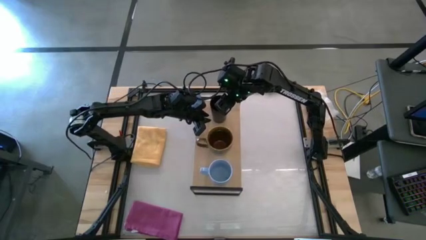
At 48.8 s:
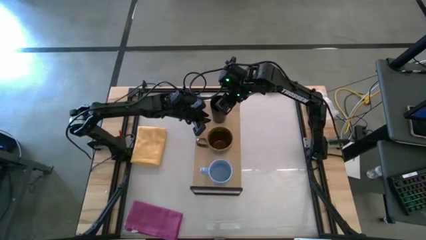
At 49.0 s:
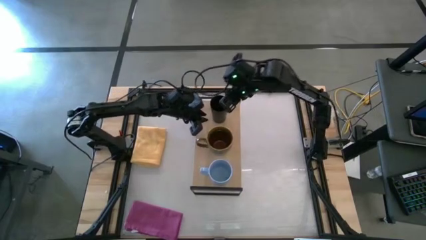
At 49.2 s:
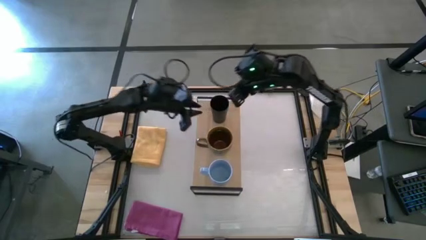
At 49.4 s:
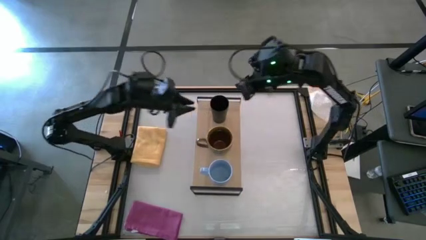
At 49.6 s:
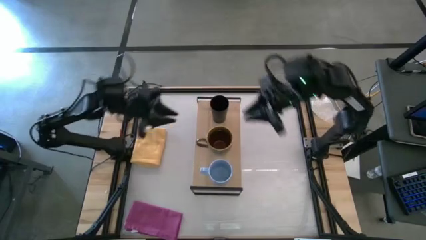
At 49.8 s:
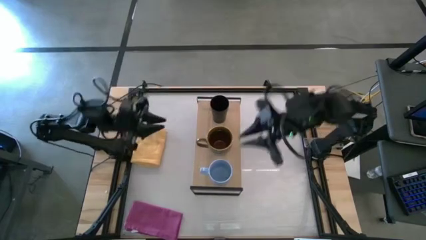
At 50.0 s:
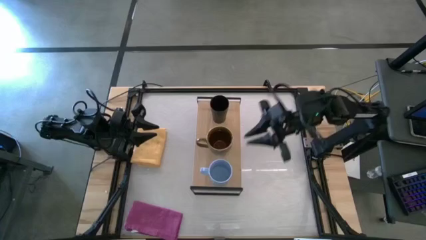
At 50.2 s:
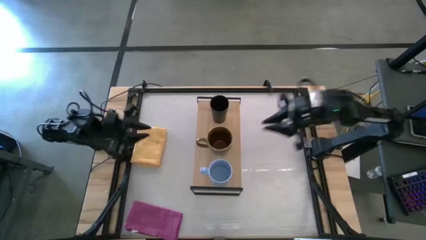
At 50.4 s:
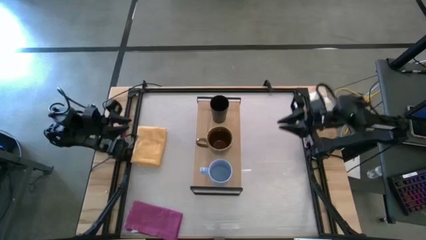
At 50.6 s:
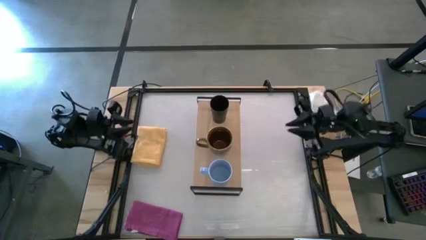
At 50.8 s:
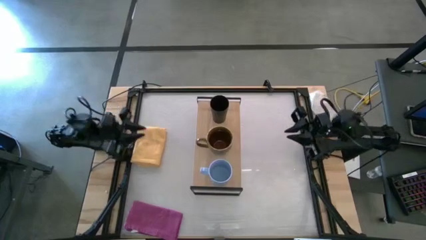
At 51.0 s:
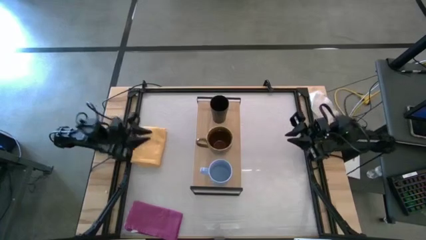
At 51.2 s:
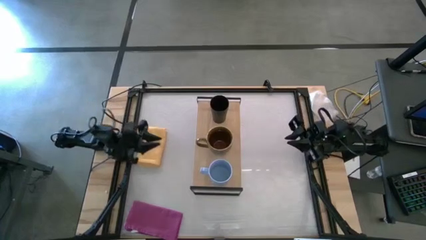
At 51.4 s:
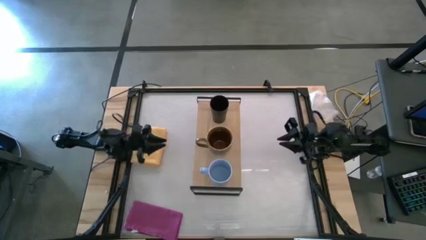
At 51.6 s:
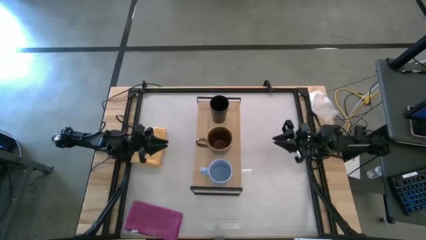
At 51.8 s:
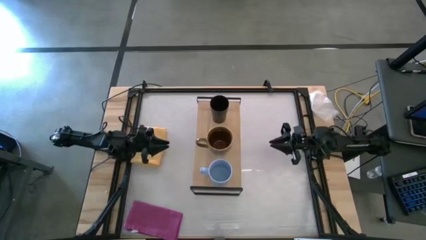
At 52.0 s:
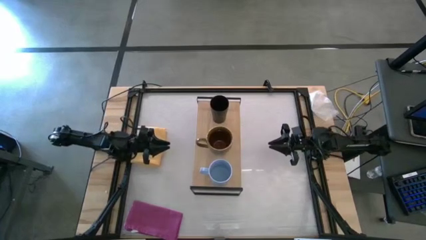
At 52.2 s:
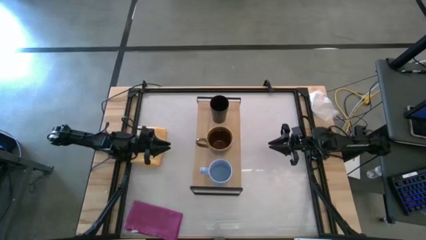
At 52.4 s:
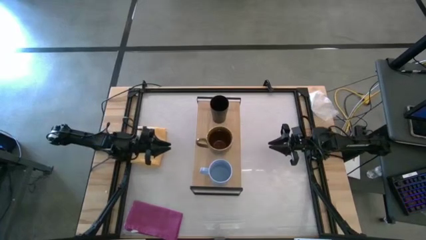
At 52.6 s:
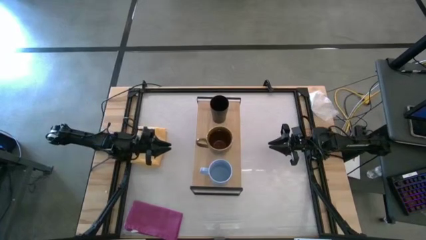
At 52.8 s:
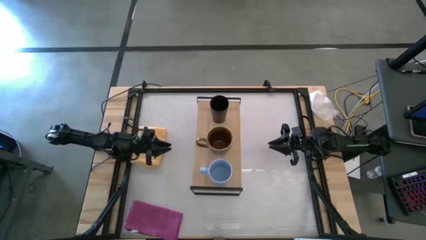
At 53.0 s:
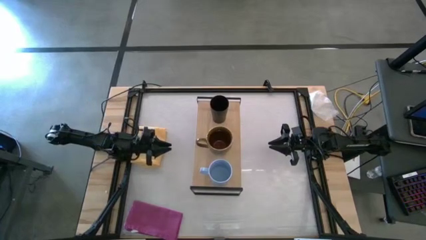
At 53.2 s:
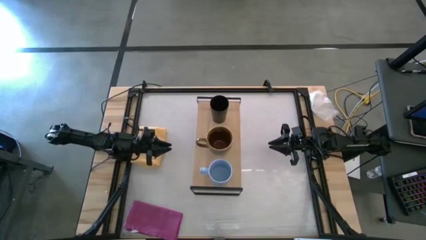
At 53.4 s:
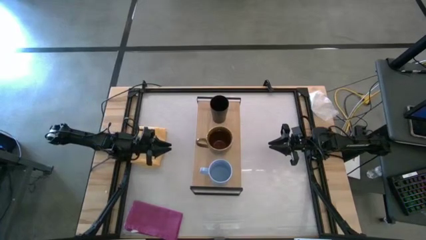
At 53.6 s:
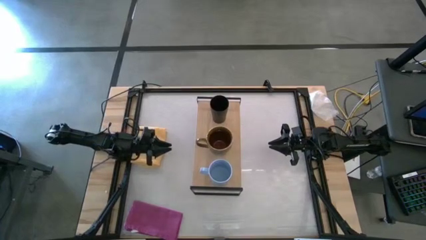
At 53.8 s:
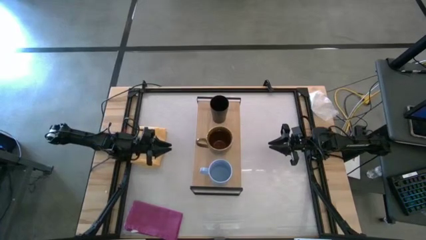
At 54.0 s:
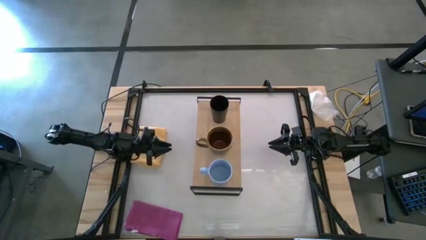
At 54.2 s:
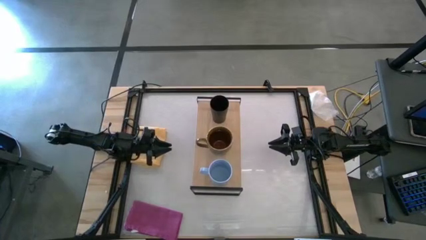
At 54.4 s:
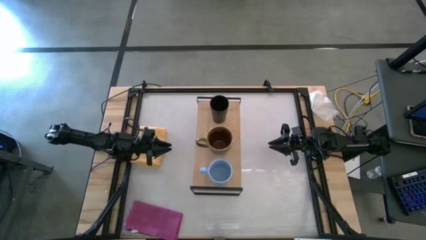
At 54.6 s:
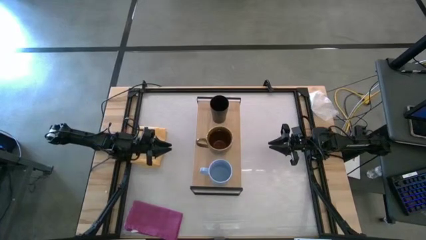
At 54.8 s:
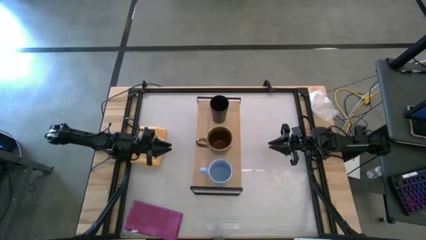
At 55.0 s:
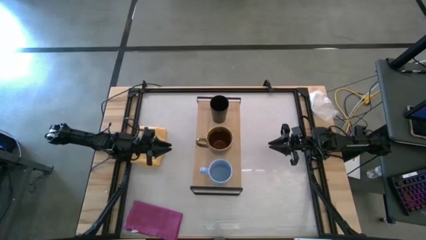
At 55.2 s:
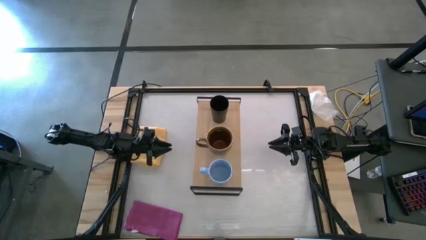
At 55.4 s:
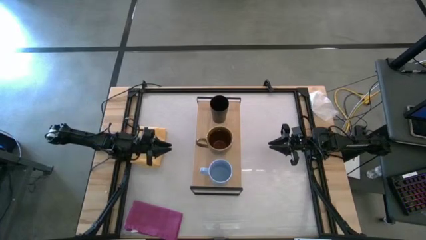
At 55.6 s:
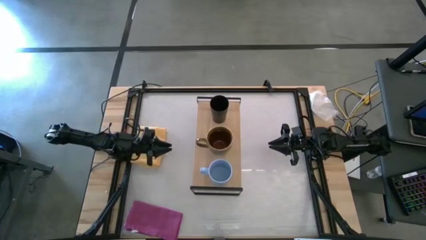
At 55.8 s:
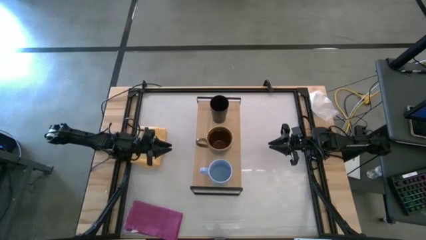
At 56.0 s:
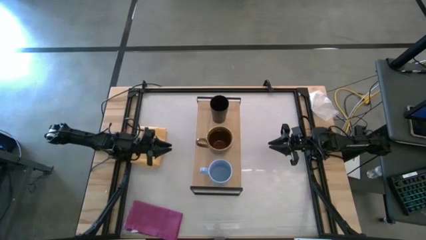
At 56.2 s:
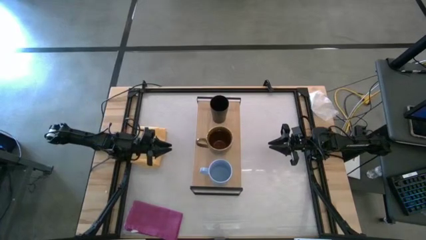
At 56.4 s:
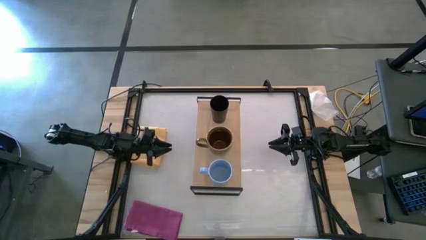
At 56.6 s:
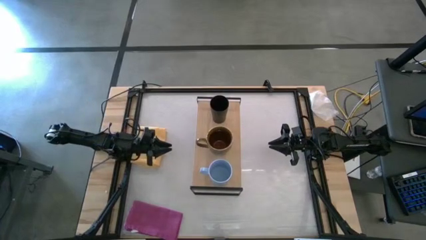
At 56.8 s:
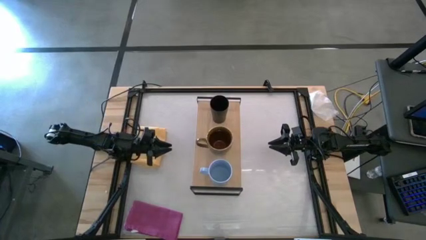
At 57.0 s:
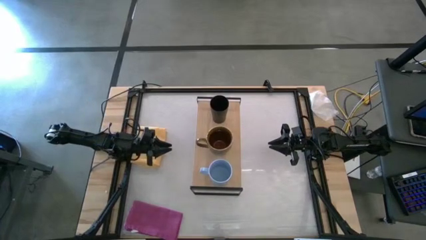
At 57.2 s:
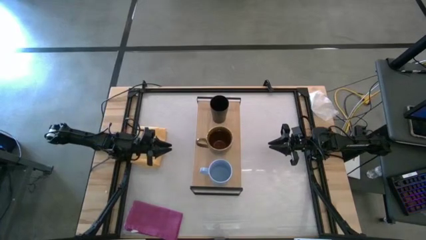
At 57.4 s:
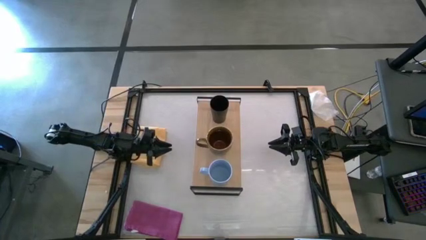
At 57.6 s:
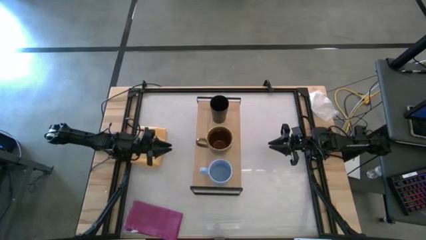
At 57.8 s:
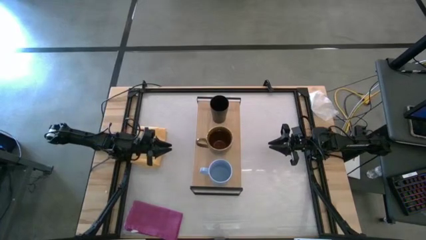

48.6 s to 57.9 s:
Task: Stack small to large cups/mugs on shelf
Return to Home Position

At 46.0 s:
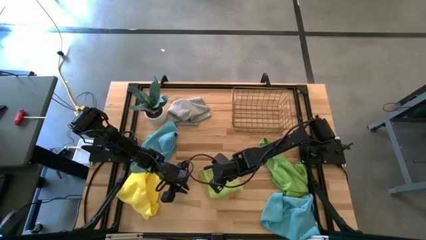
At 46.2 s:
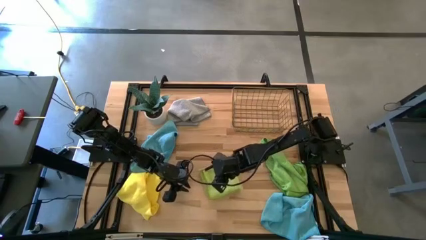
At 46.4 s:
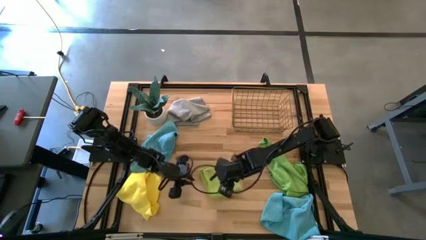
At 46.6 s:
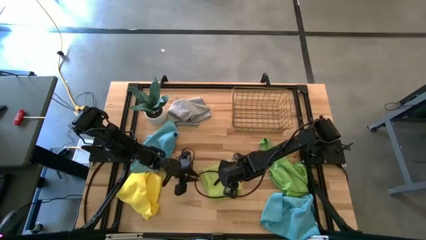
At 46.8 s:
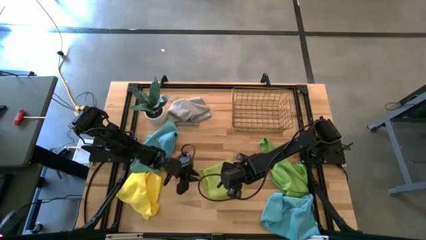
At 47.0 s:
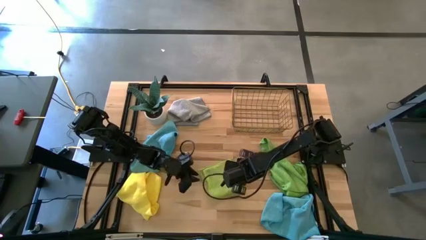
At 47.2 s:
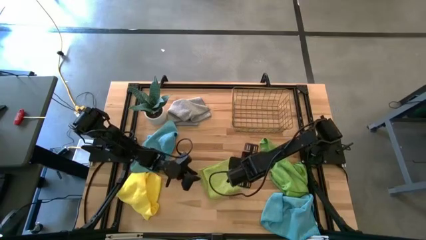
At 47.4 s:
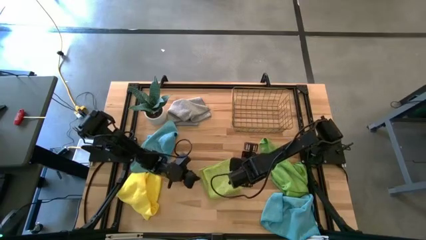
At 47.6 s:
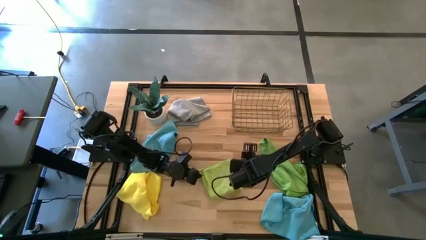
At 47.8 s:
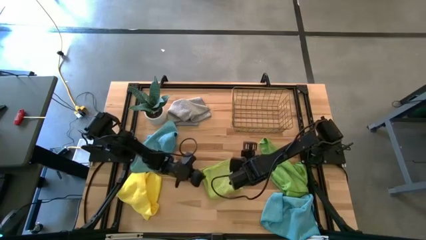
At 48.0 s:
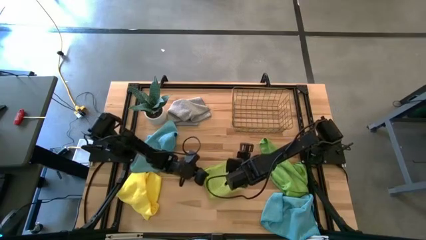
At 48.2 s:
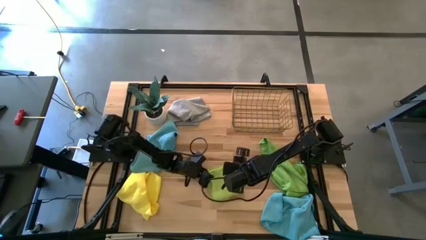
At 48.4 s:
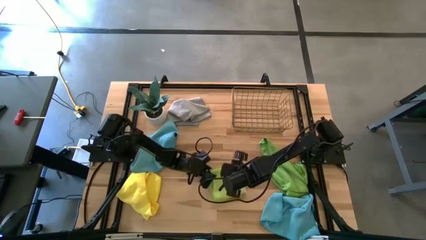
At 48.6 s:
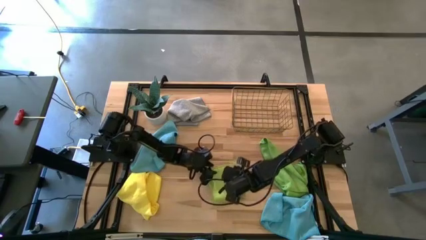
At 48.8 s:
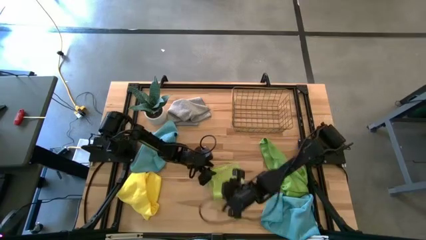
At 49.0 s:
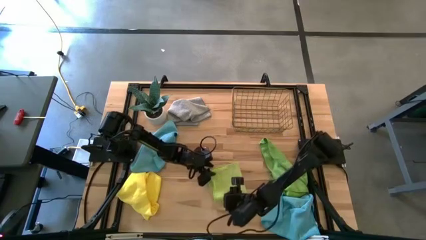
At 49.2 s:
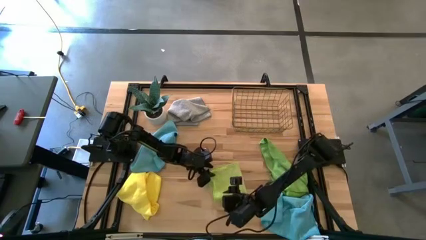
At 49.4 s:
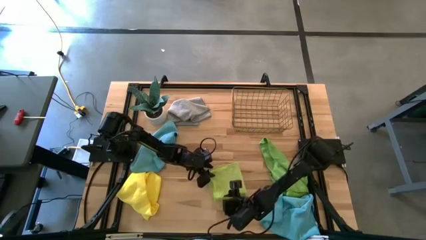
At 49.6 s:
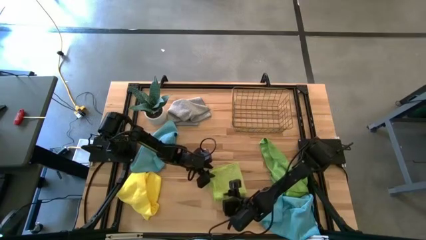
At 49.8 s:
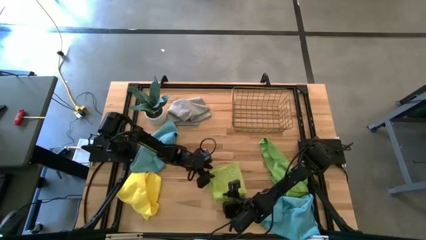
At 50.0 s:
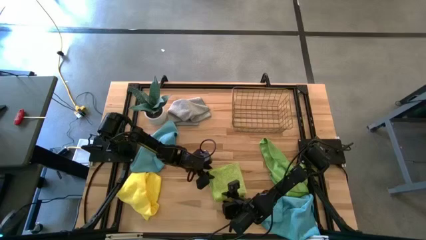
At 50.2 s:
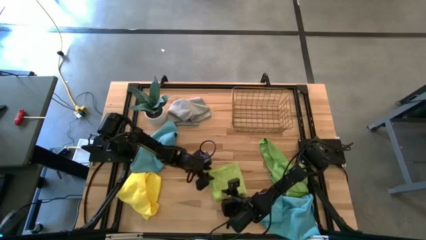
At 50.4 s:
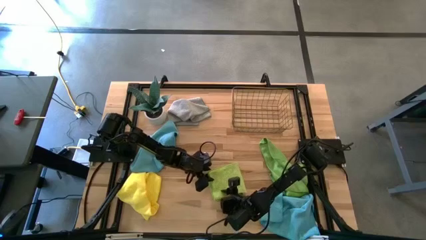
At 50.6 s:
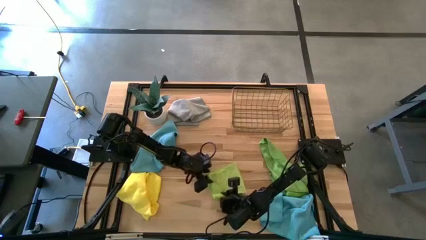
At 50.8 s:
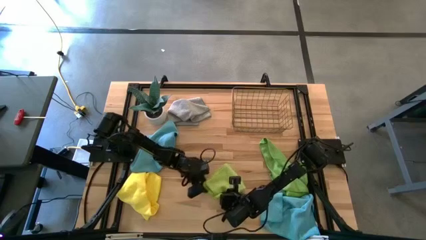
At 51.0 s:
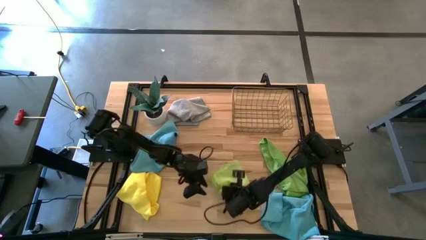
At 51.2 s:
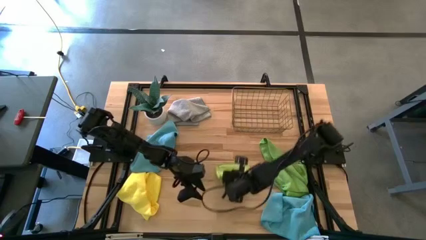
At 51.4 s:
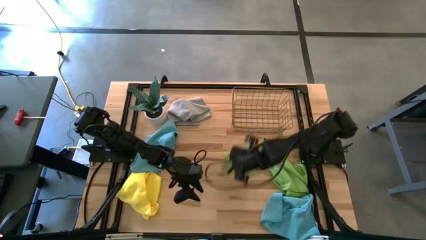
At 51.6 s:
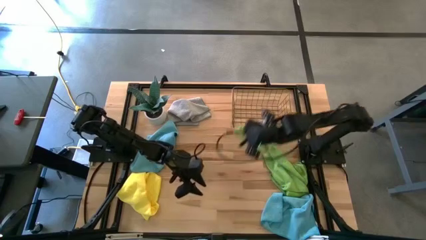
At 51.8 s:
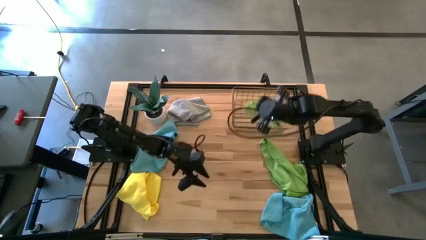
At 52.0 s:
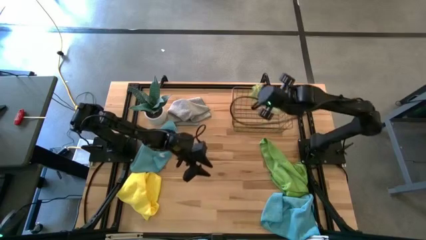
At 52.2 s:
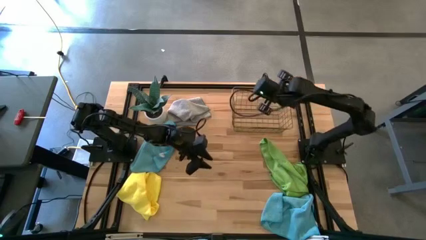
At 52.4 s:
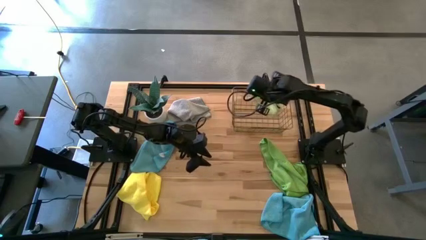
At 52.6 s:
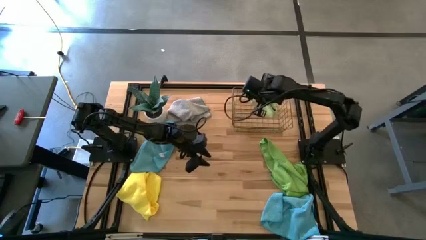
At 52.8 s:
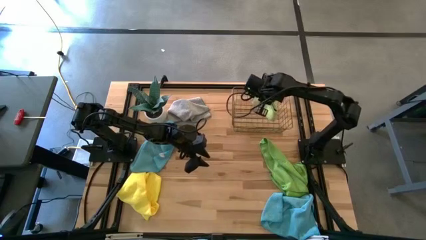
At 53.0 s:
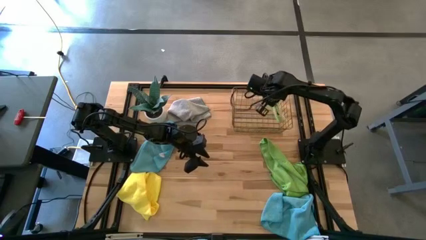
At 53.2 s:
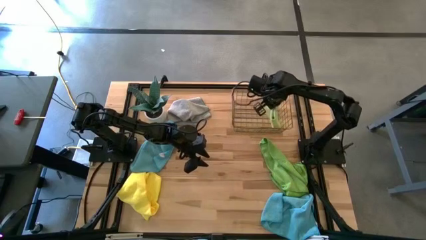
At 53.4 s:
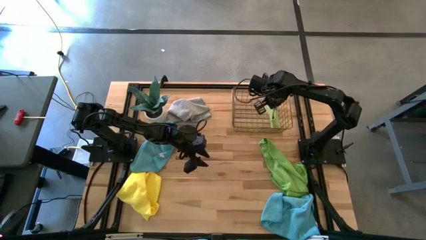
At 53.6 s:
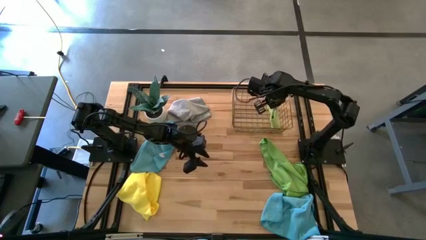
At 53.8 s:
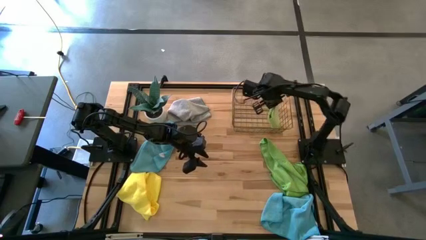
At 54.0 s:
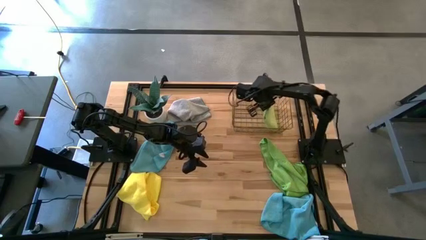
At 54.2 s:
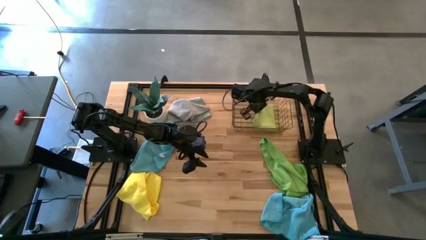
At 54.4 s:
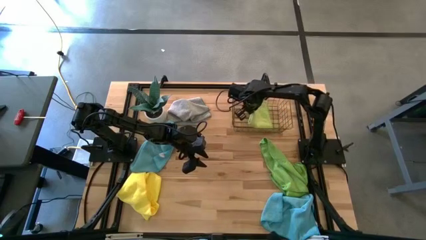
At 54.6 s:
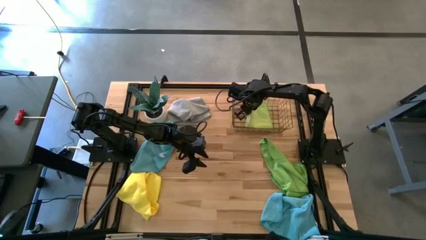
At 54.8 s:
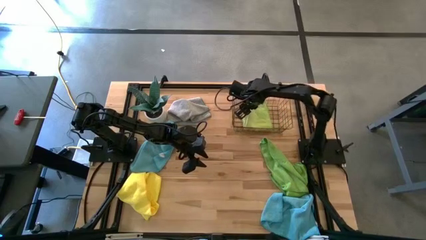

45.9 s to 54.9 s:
Task: Fold microfiber towels
Put the folded light green microfiber towel into the wire basket
